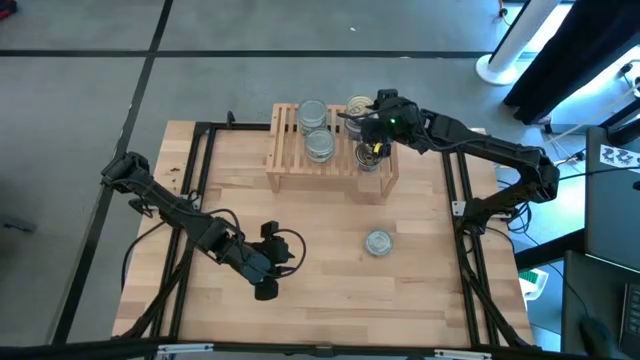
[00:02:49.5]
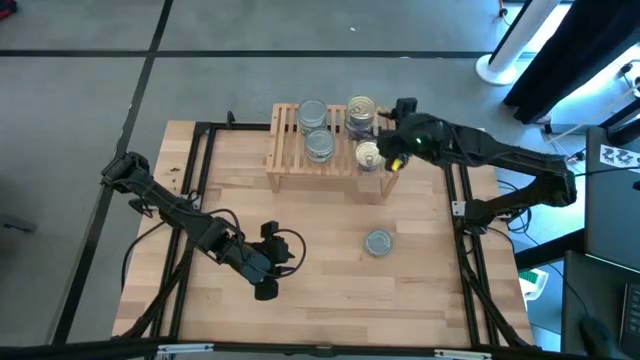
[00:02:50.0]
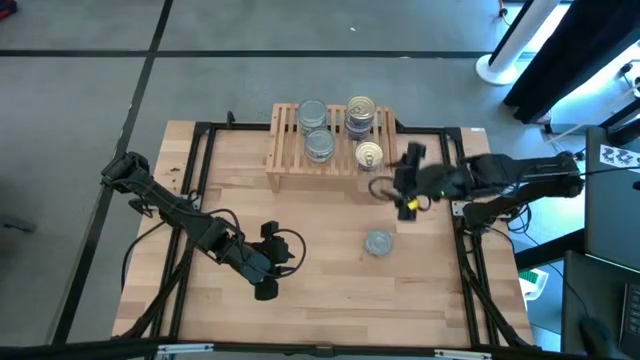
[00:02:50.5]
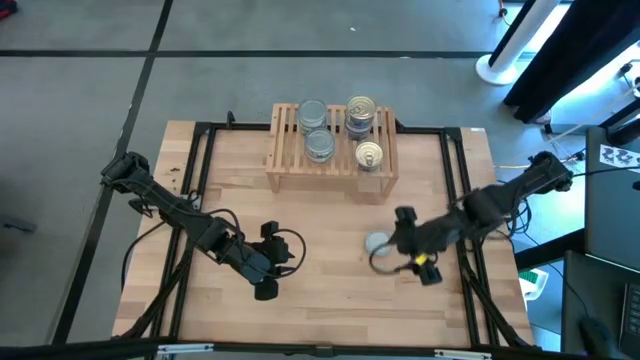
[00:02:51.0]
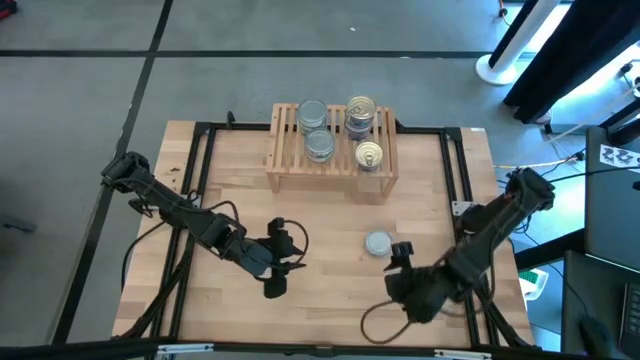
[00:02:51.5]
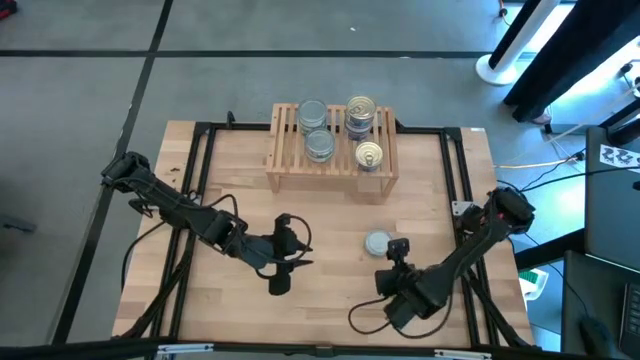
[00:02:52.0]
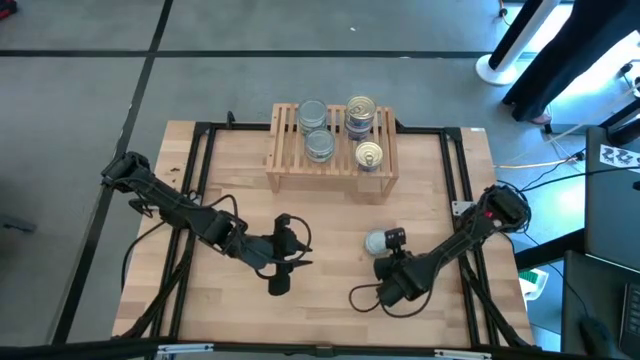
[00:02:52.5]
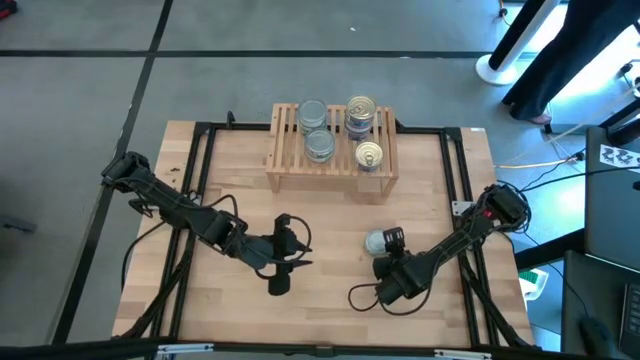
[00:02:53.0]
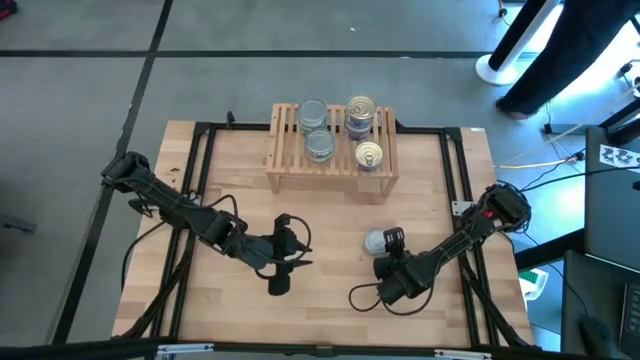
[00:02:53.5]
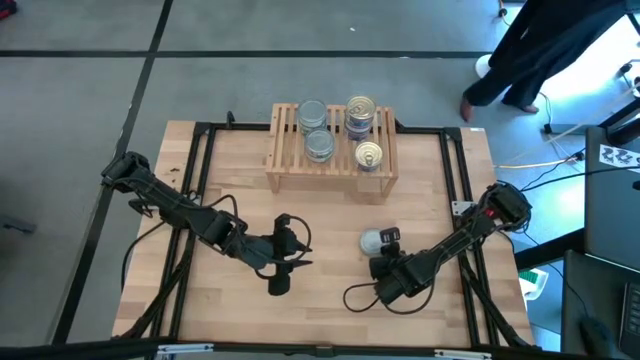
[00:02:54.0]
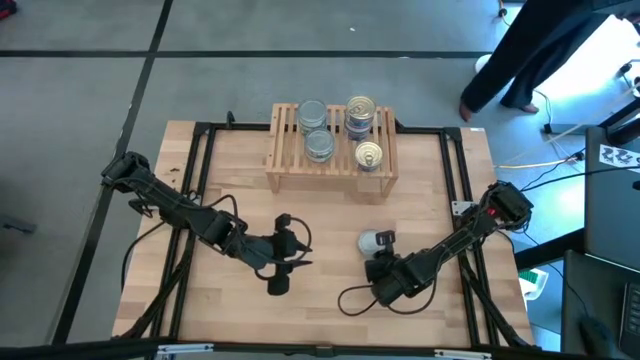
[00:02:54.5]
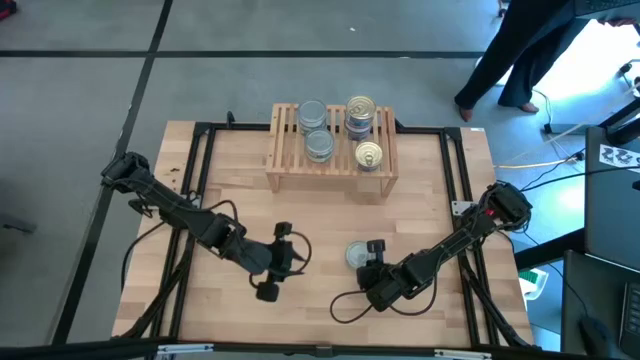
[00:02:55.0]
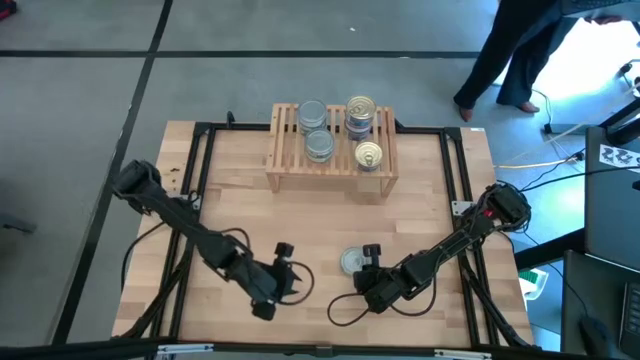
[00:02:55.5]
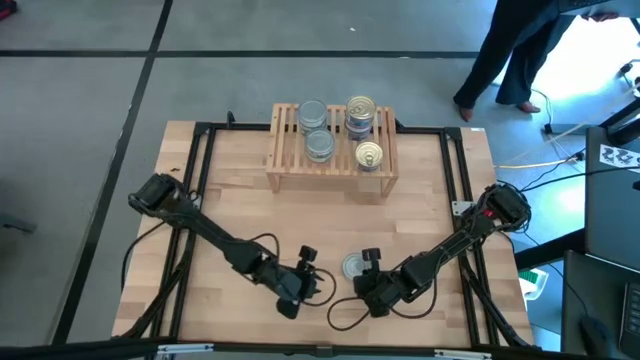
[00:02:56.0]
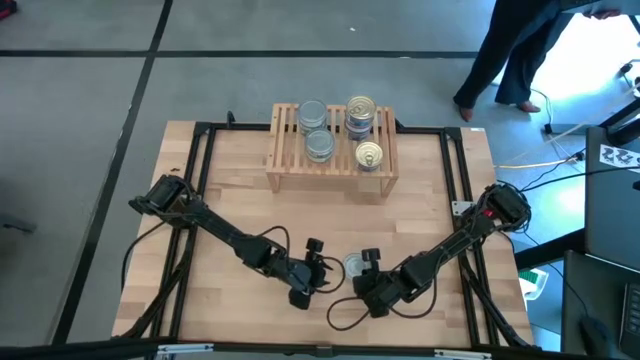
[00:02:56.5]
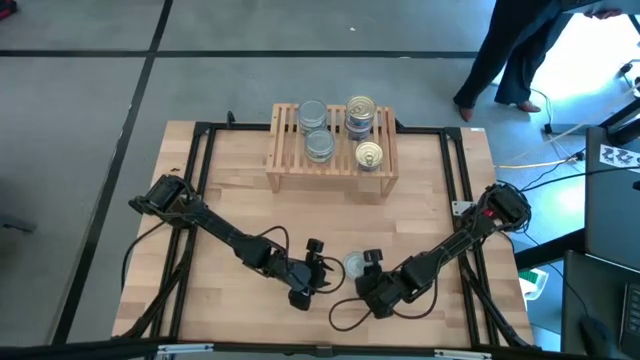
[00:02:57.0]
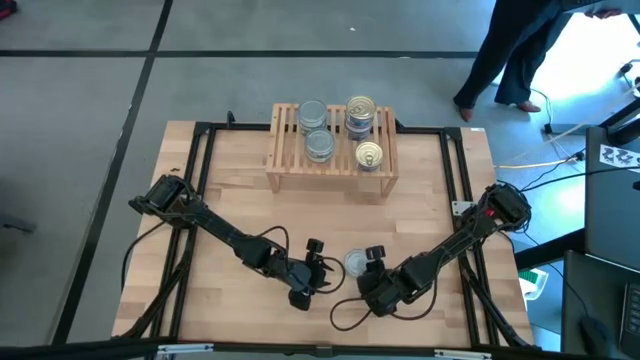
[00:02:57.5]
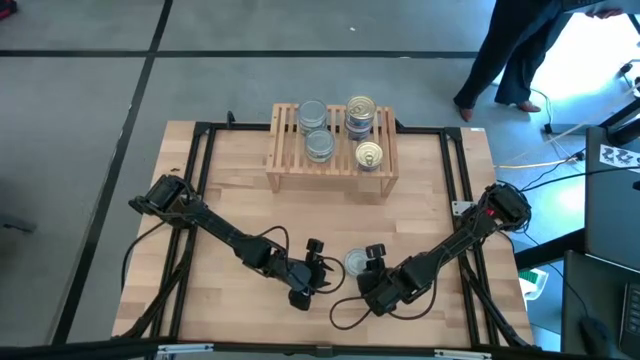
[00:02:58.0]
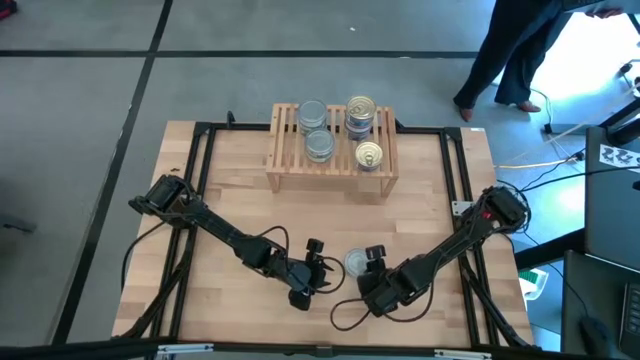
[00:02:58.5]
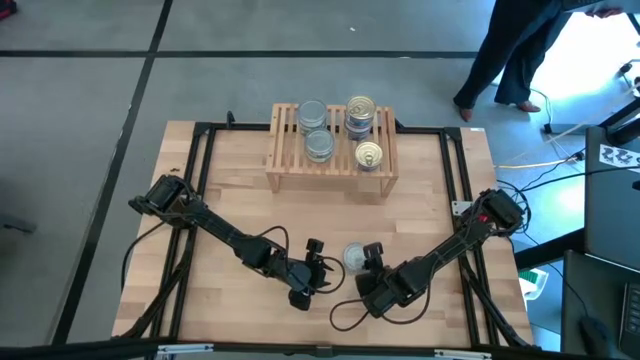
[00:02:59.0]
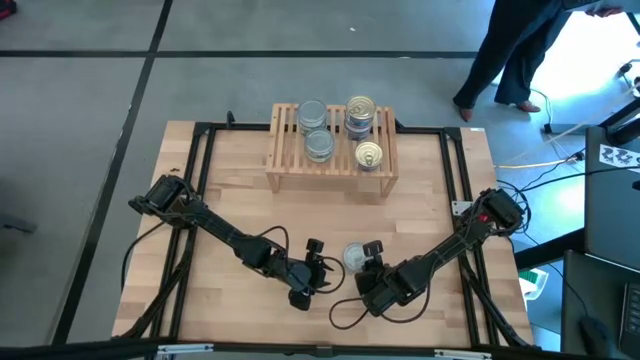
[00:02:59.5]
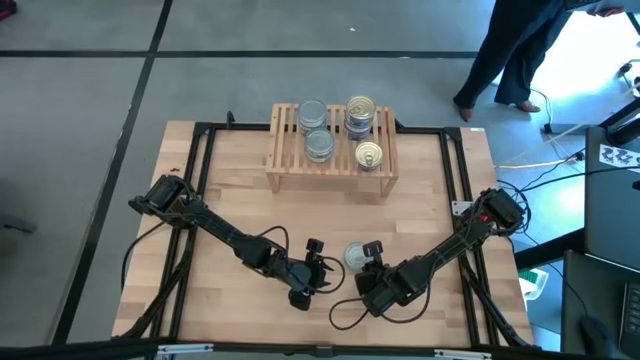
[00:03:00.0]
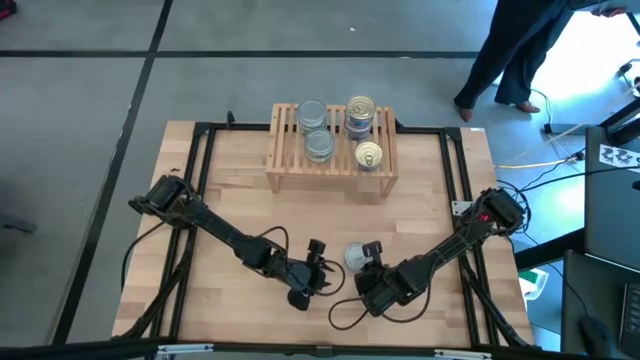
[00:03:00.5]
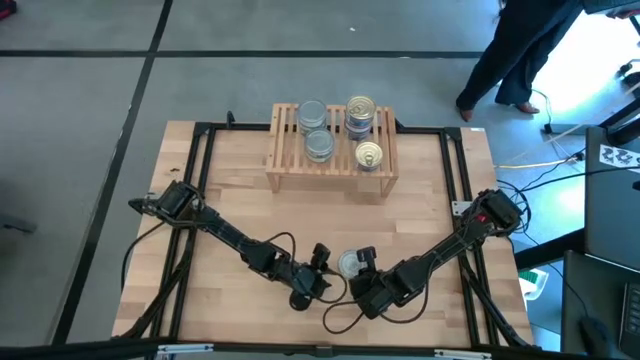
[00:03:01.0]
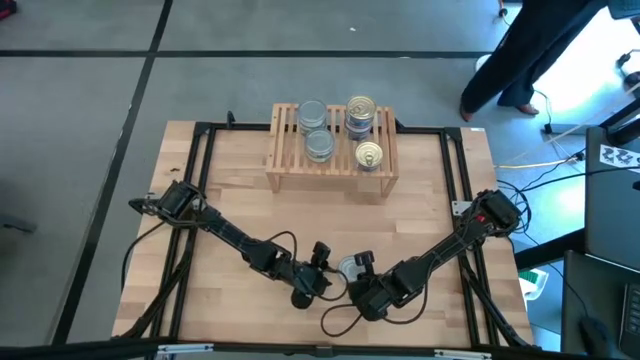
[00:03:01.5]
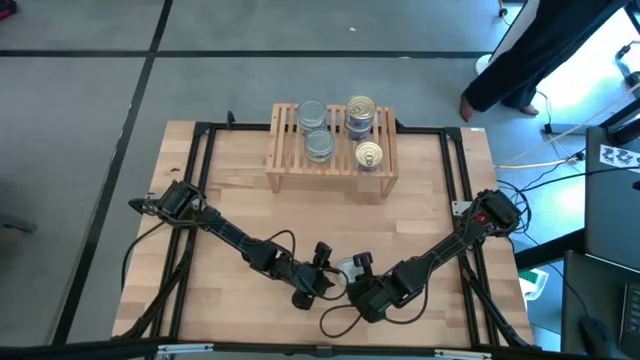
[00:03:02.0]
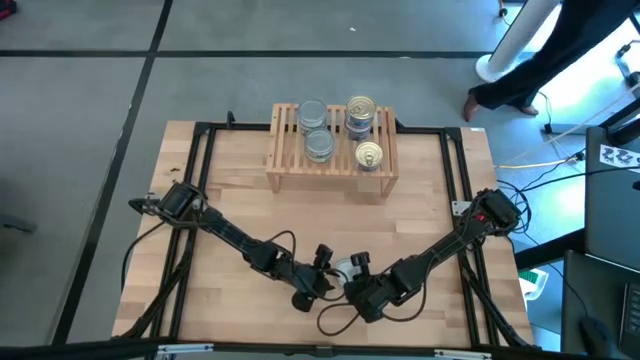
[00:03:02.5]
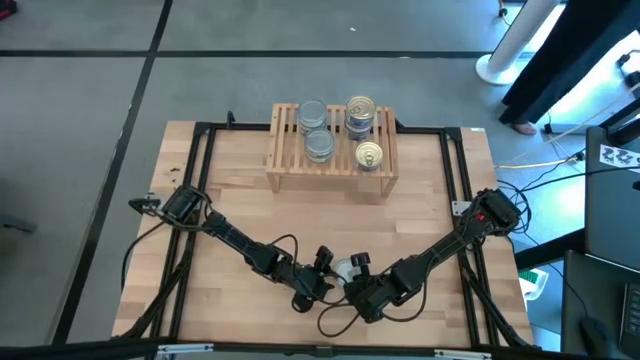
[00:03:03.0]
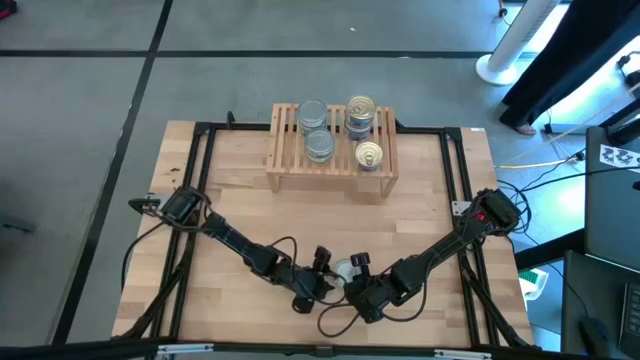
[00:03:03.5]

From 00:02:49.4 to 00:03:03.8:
Task: Stack canned seafood by type on shelf
Stack the green white tuna can on top of the green white tuna can on the shelf

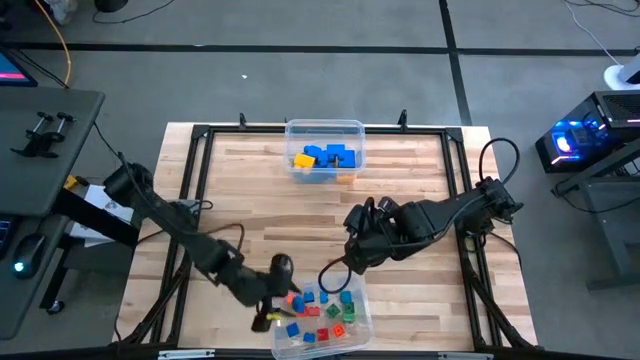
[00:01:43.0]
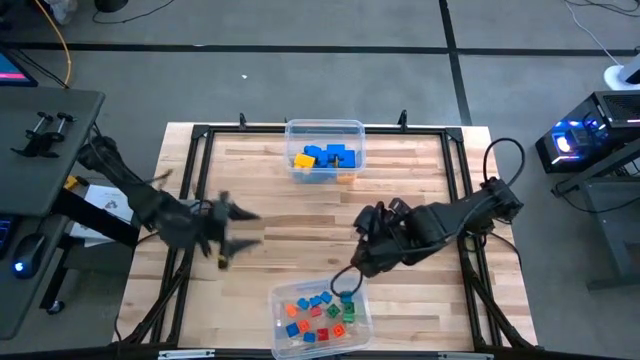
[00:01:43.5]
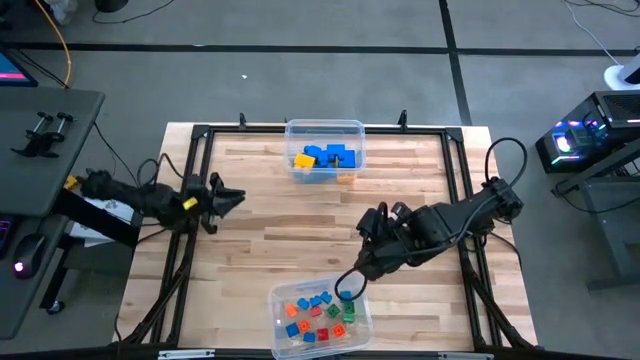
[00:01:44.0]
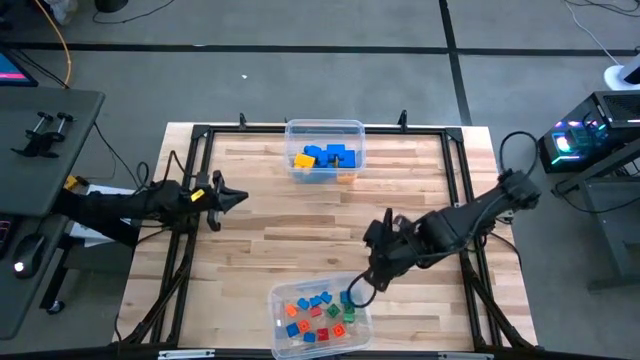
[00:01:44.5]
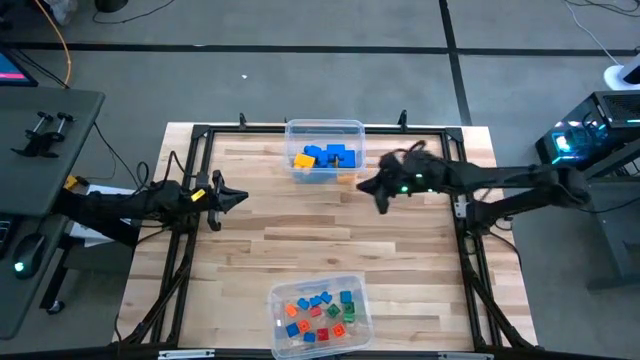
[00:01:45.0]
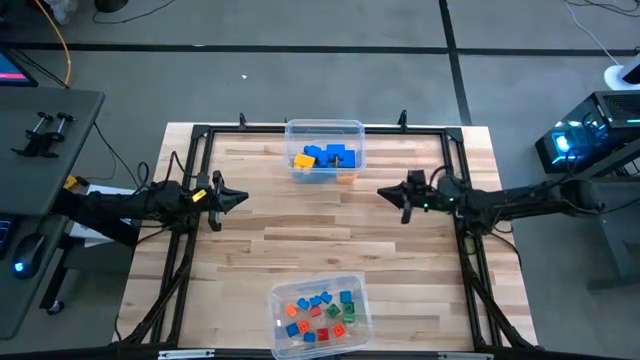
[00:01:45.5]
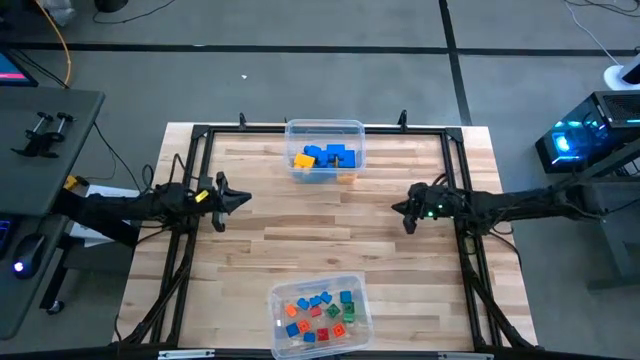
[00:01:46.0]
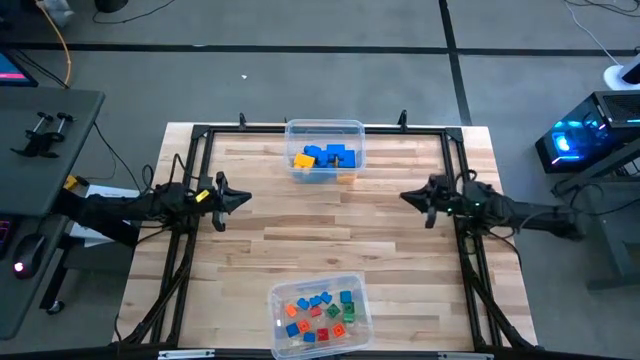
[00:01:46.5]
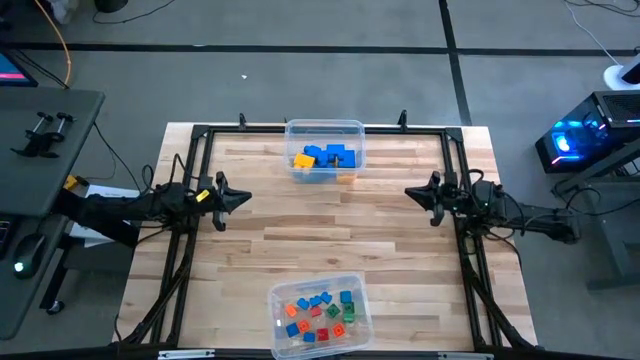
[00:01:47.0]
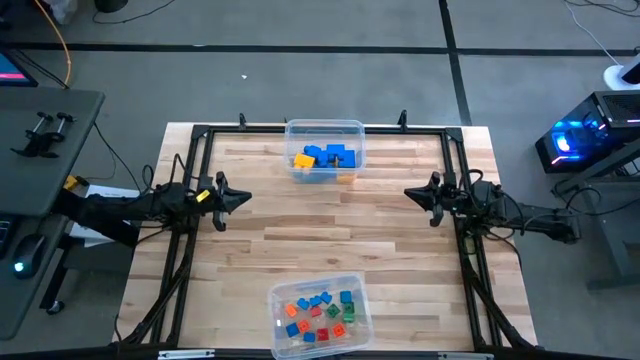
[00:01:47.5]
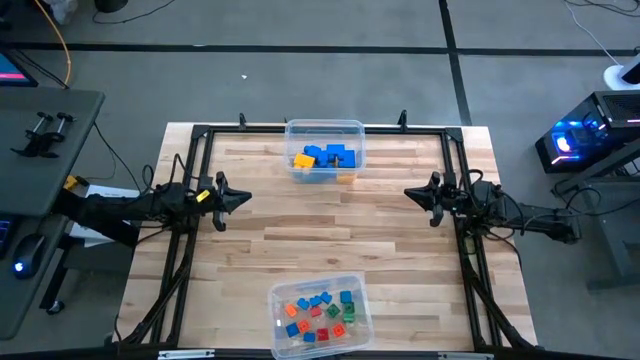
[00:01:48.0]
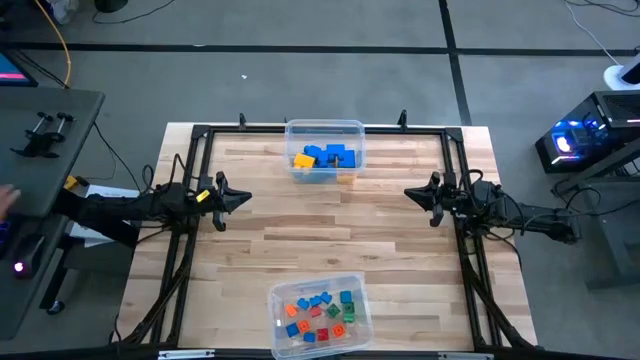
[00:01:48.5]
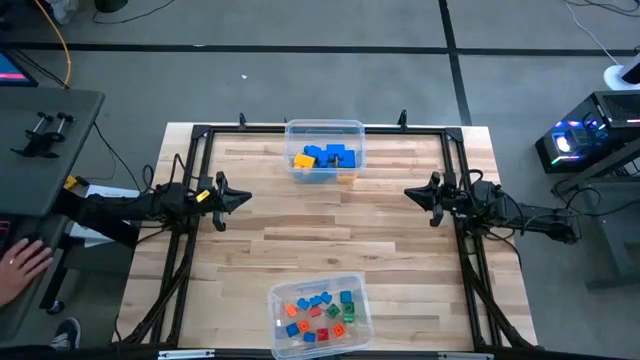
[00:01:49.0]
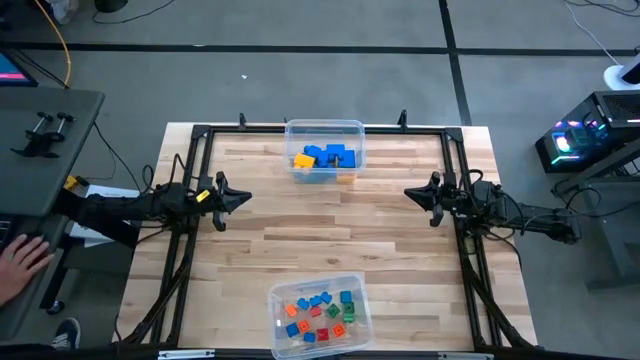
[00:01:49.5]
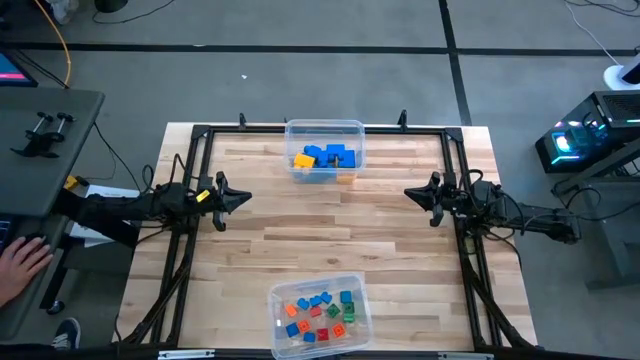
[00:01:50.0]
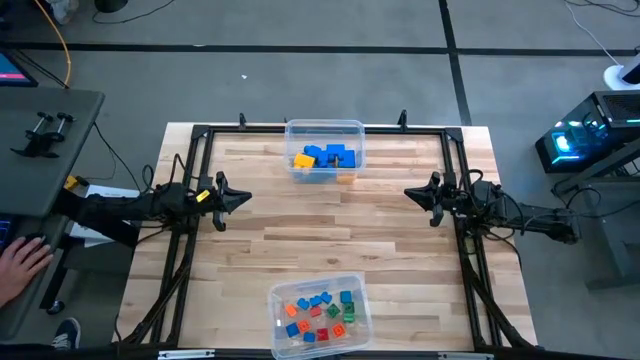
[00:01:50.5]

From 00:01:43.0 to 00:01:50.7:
Task: Sort blocks by size
Return to Home position
